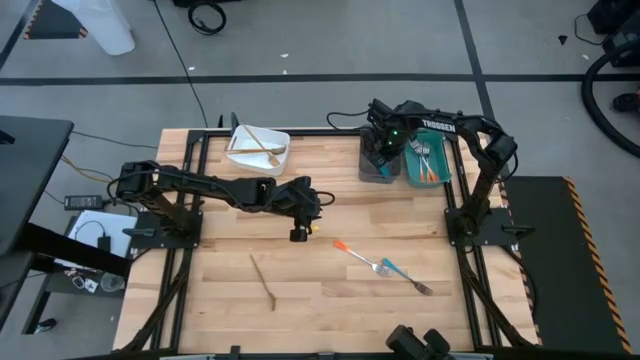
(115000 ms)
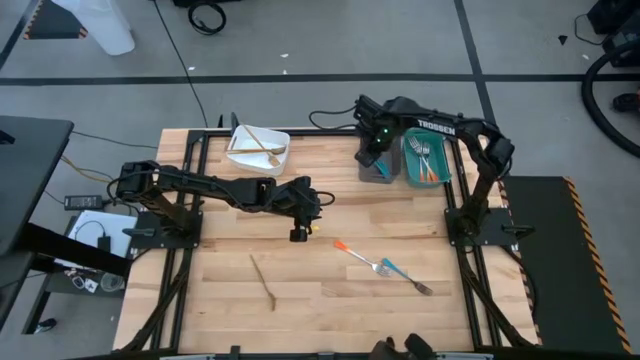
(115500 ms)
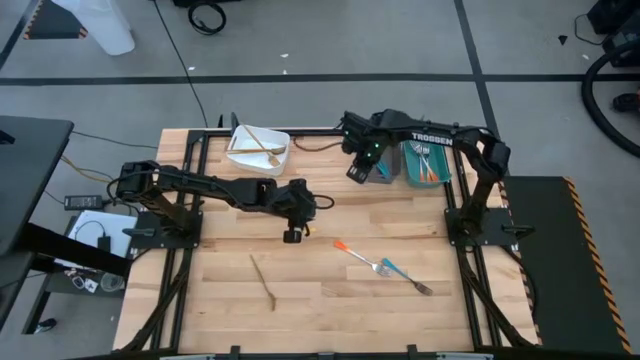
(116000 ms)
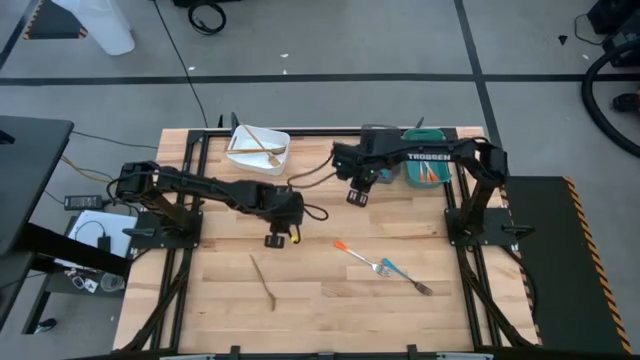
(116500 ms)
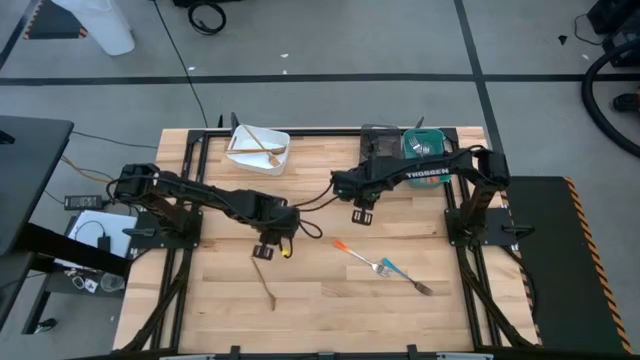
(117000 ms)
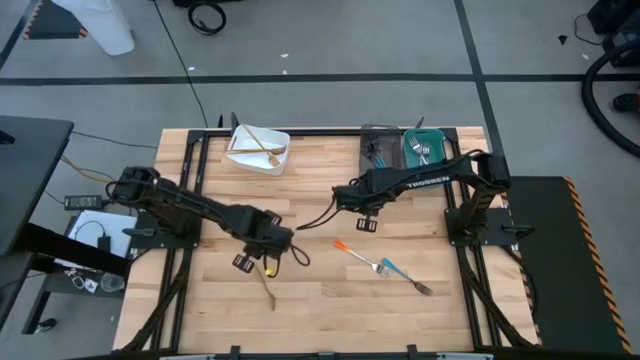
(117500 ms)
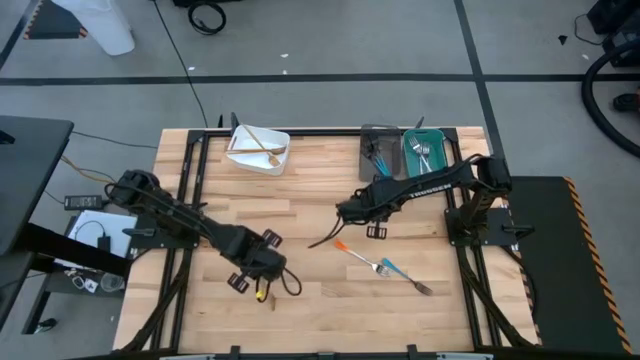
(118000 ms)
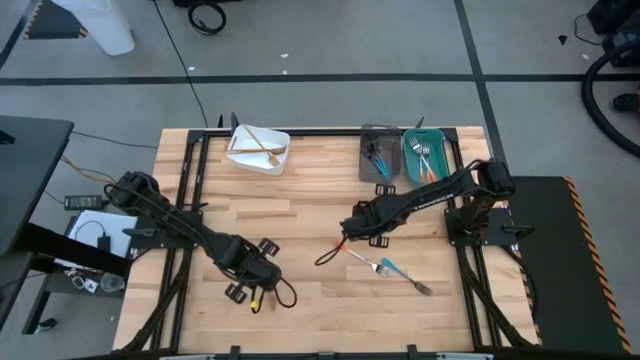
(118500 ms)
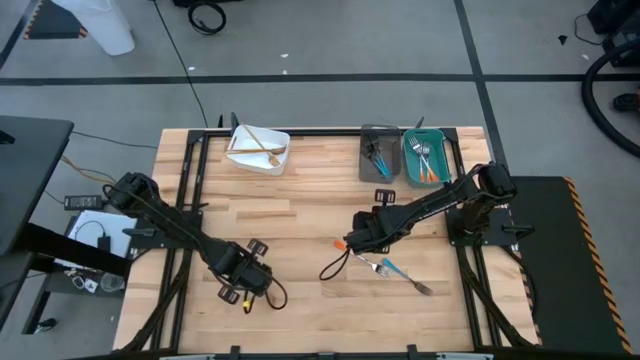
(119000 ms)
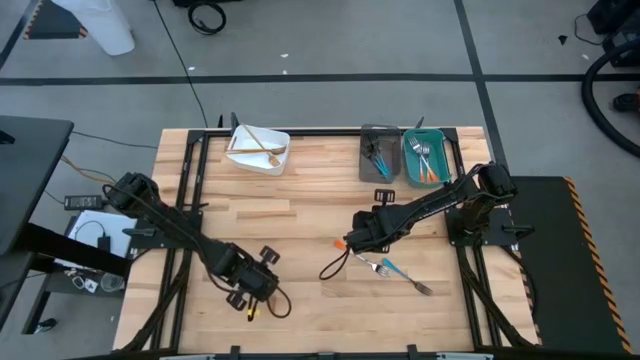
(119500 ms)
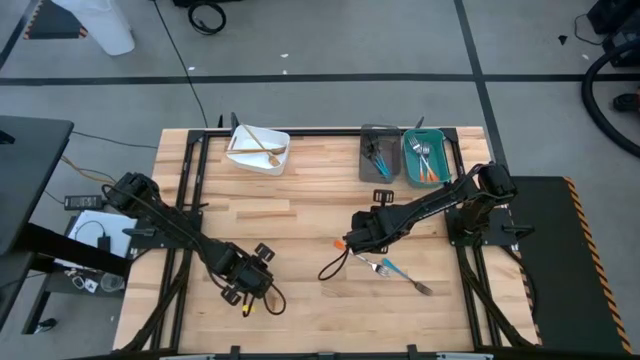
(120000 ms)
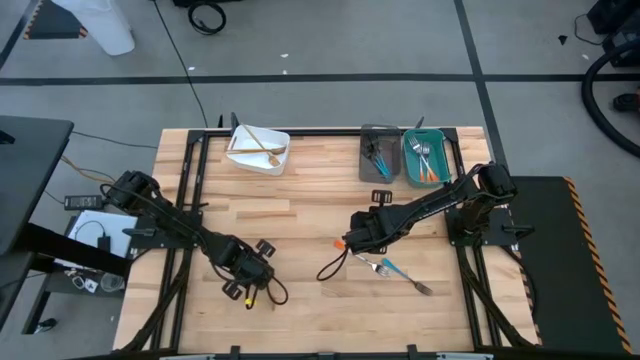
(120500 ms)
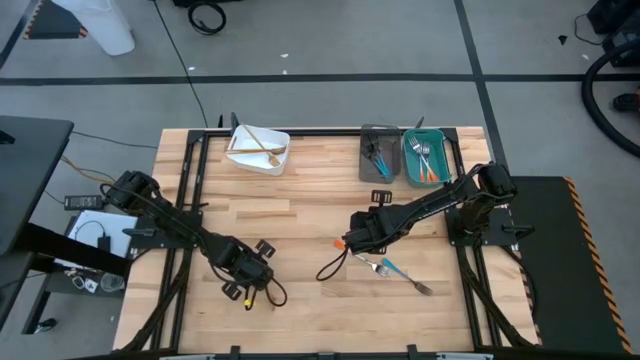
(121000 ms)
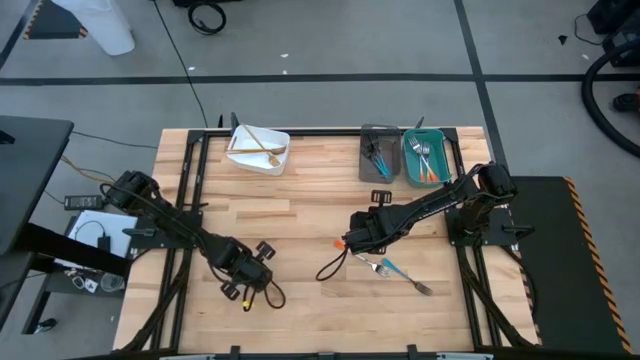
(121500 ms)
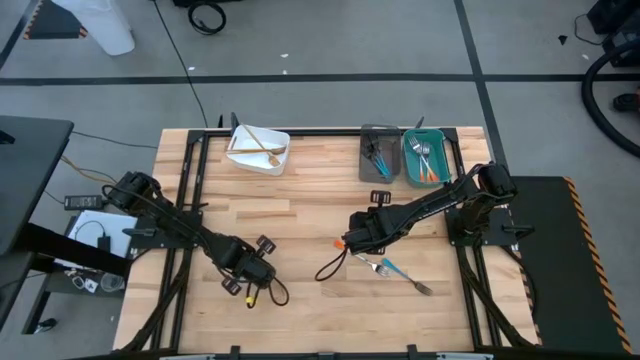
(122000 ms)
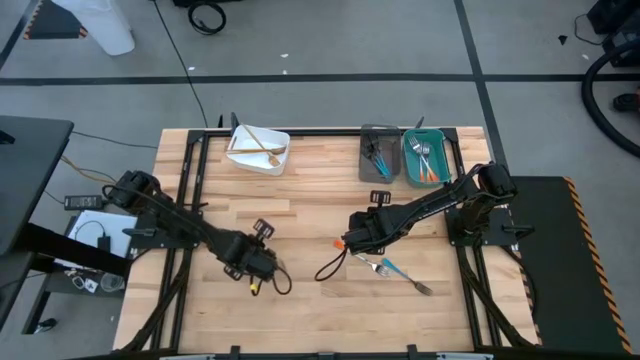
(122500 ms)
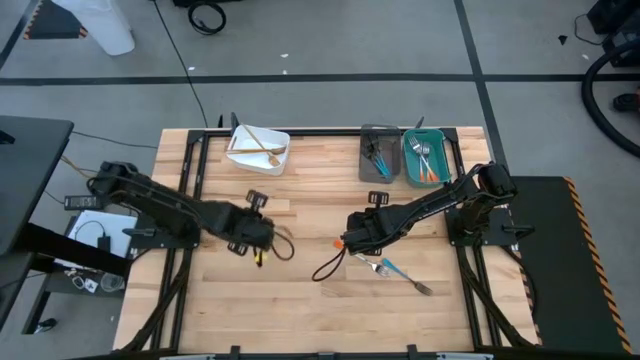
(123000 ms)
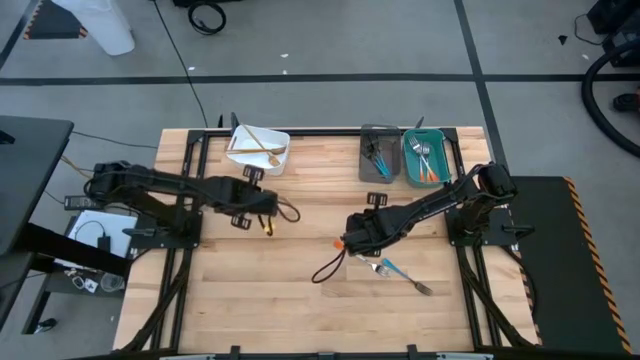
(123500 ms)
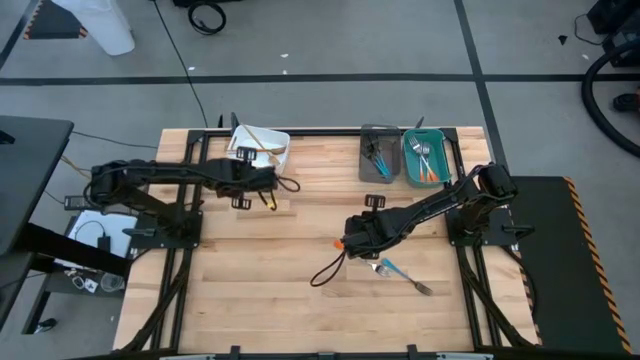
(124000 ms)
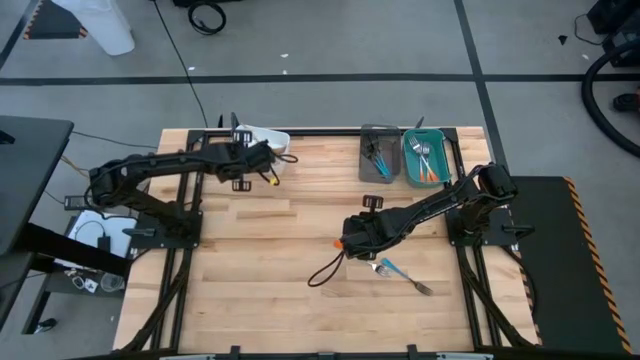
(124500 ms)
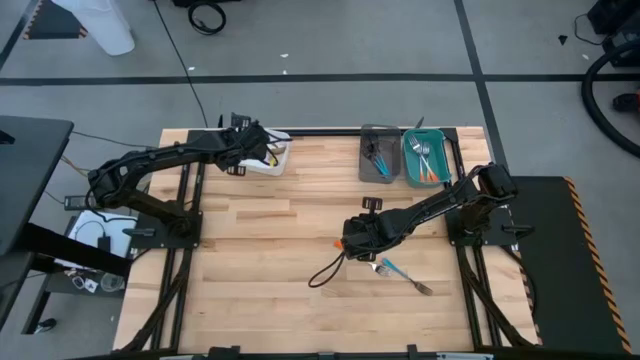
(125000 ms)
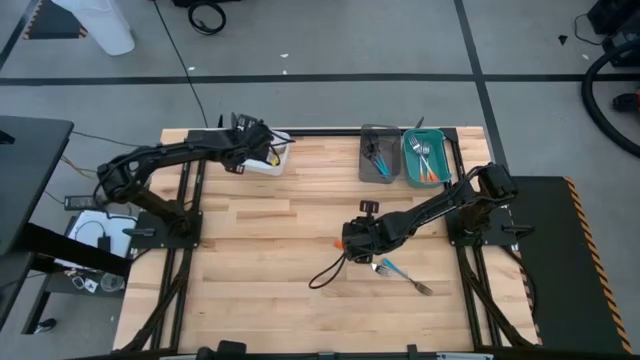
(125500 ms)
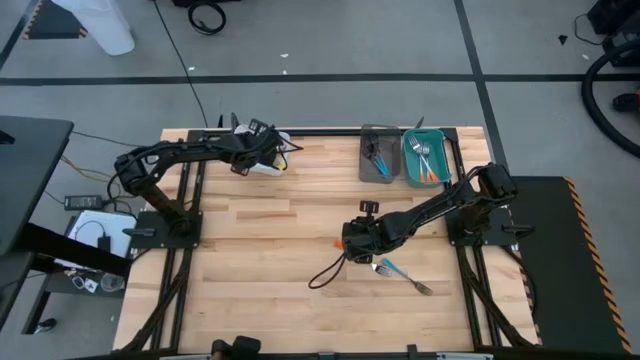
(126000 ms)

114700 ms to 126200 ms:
Task: Sort silverware by color (type)
Put the gold fork into the white bin

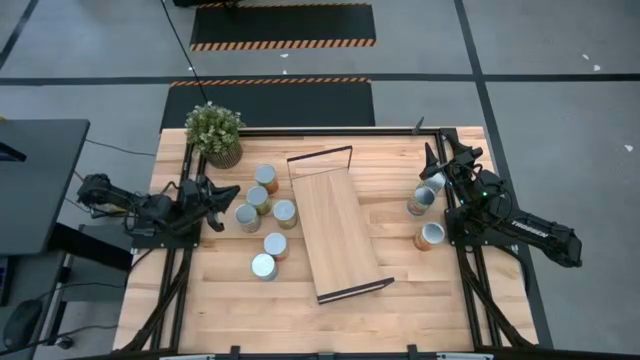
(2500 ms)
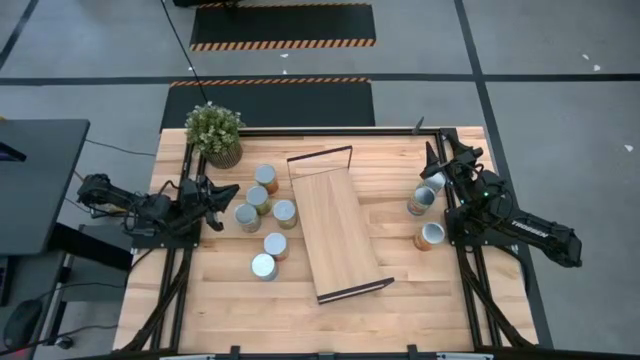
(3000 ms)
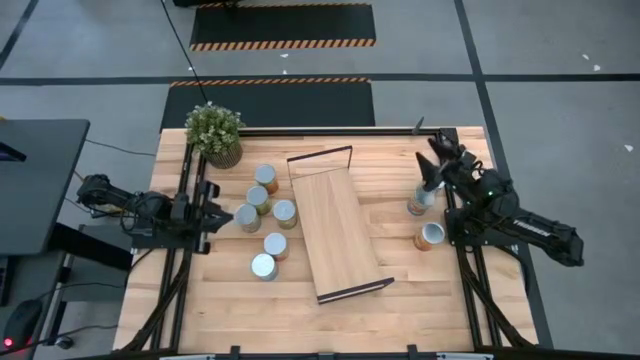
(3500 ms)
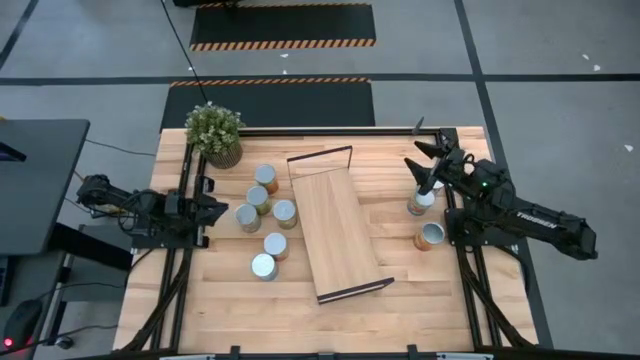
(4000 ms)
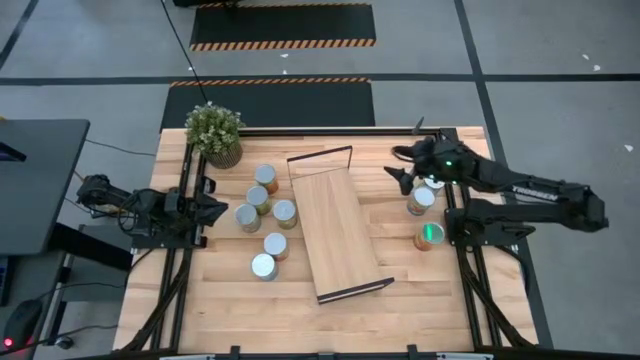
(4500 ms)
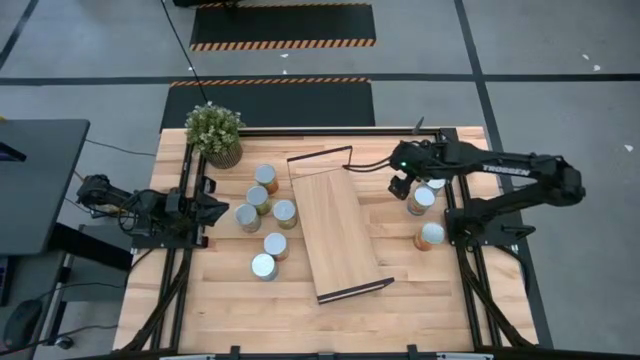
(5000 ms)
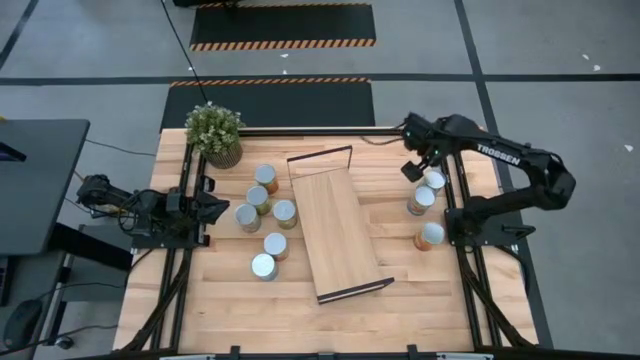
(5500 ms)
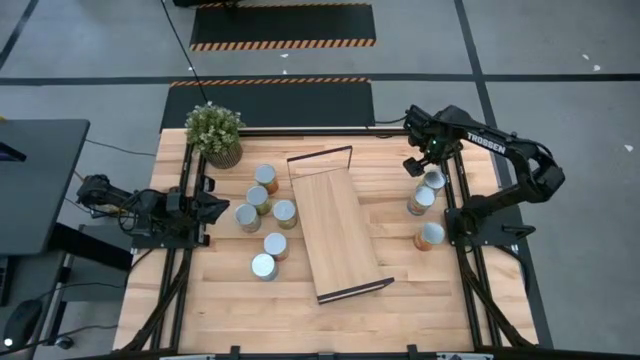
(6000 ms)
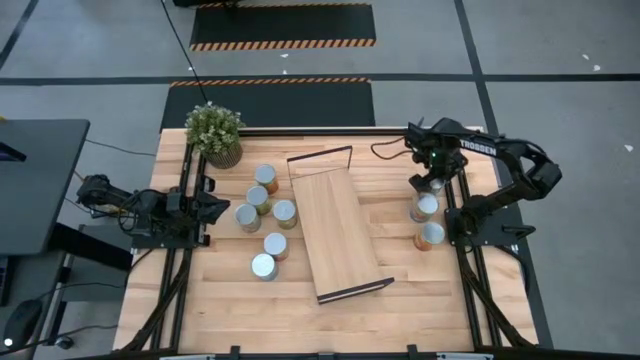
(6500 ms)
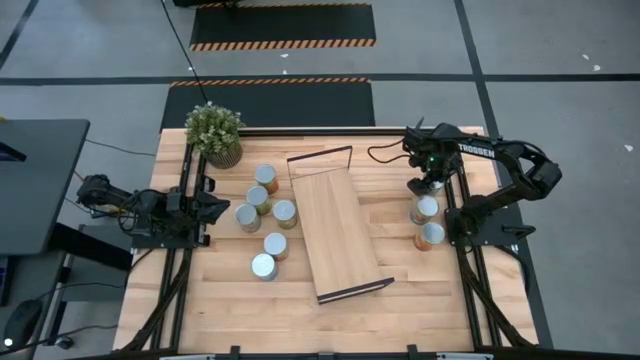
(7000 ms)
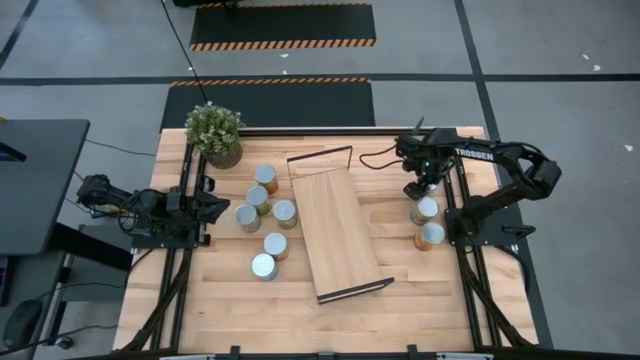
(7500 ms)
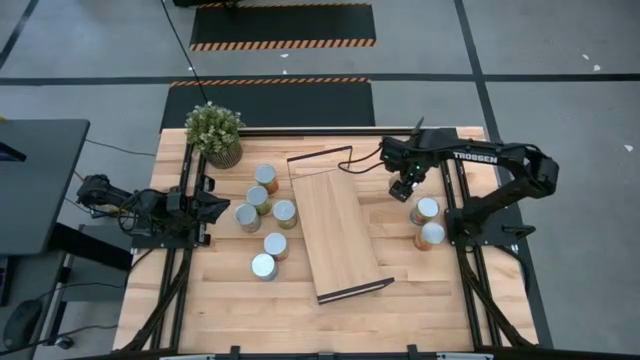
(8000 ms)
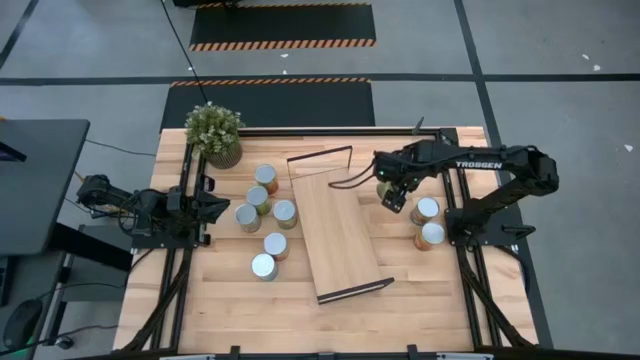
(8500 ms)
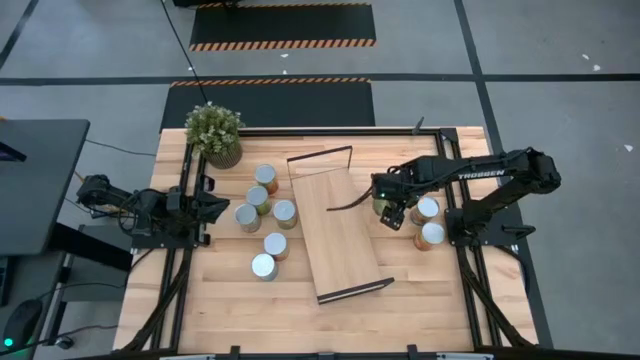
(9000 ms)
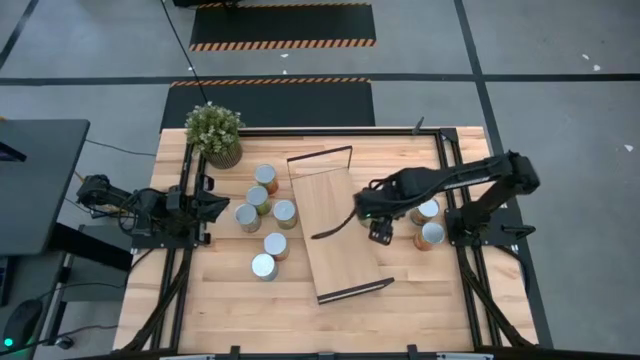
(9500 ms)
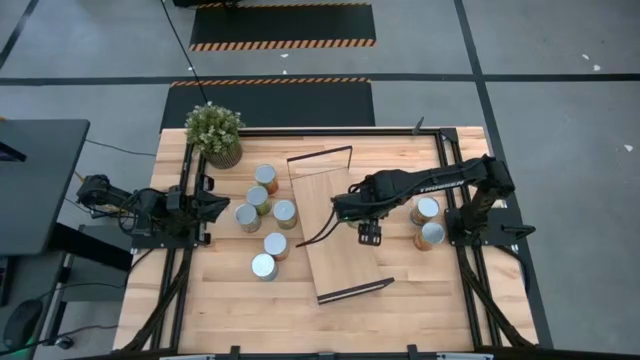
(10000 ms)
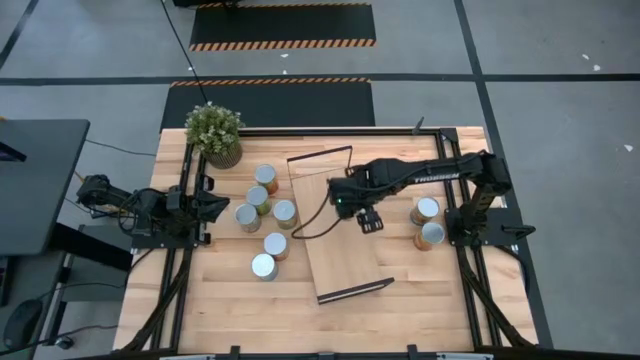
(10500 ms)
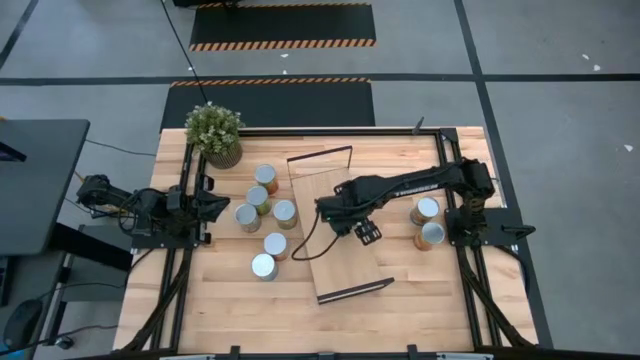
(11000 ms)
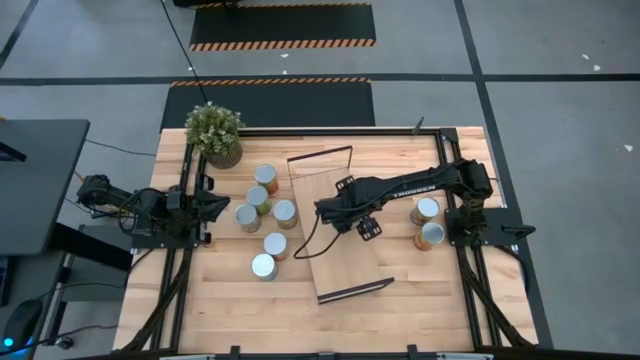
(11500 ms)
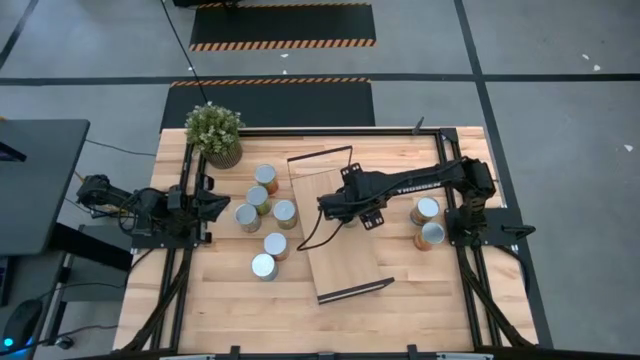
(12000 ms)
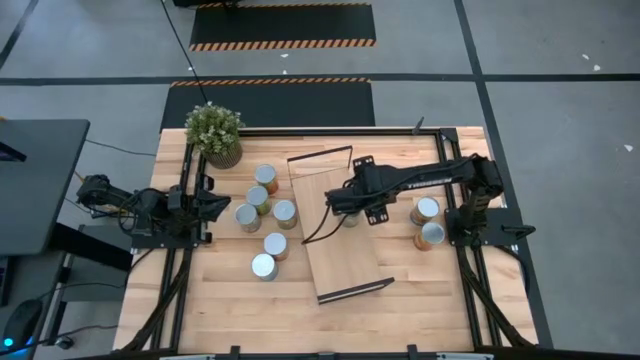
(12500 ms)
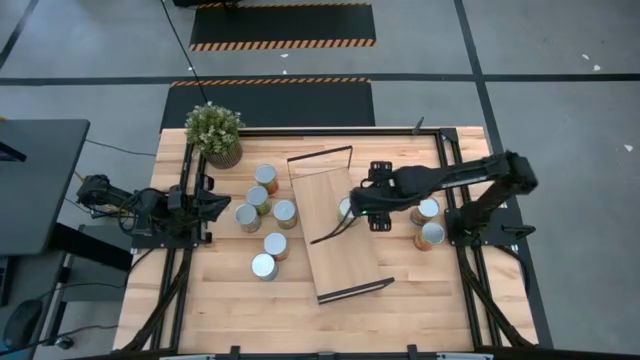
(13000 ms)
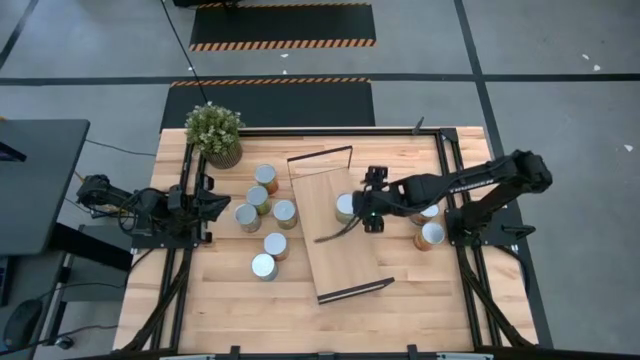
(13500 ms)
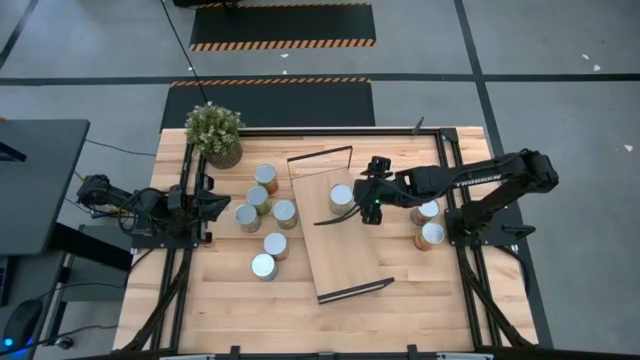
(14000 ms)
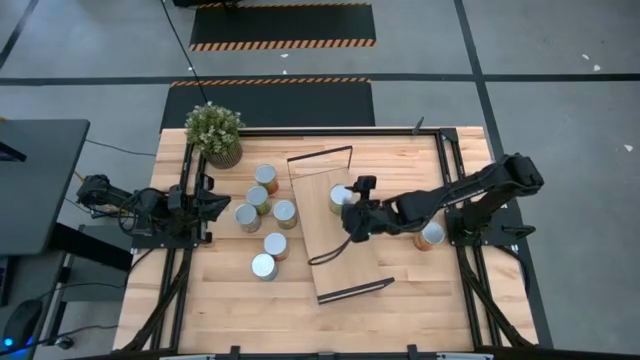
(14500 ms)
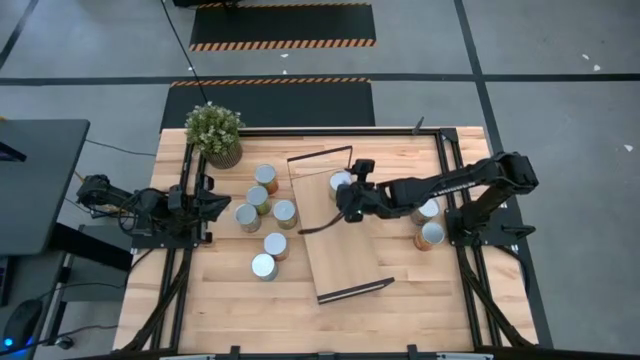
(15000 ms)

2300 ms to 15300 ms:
Task: Pick and place cans onto a shelf
Put the right canned oranges on the shelf
